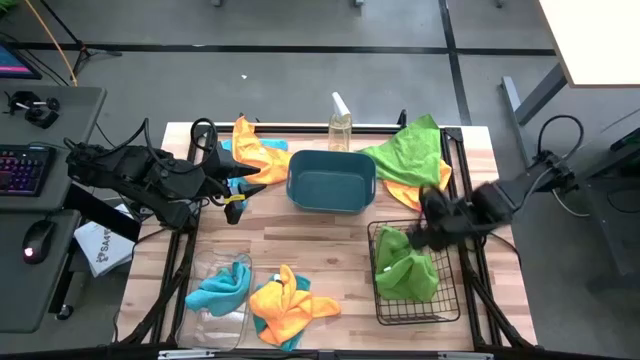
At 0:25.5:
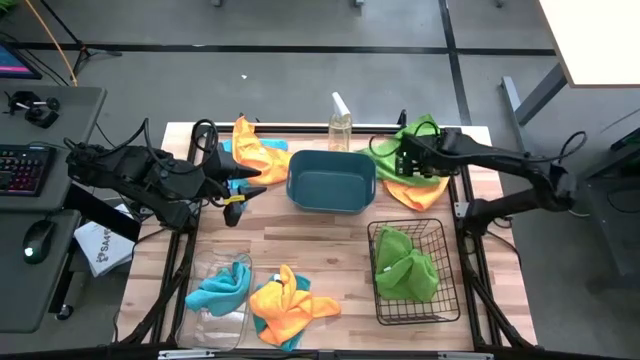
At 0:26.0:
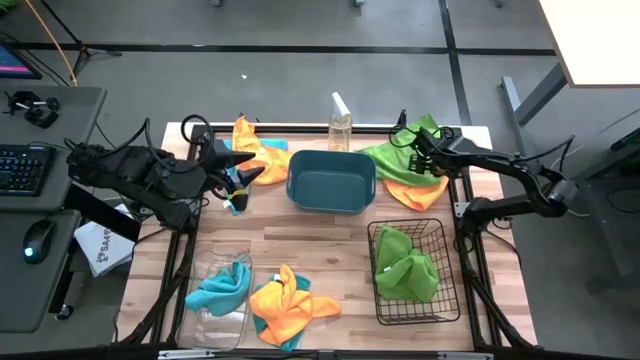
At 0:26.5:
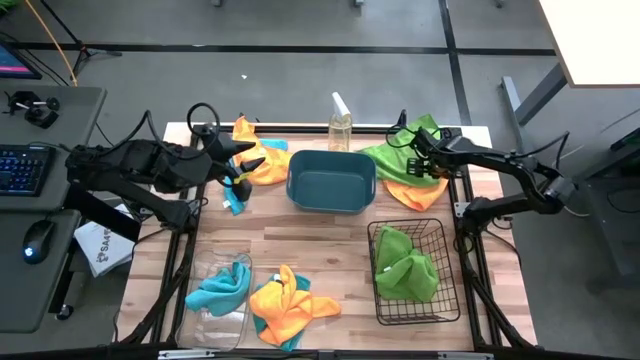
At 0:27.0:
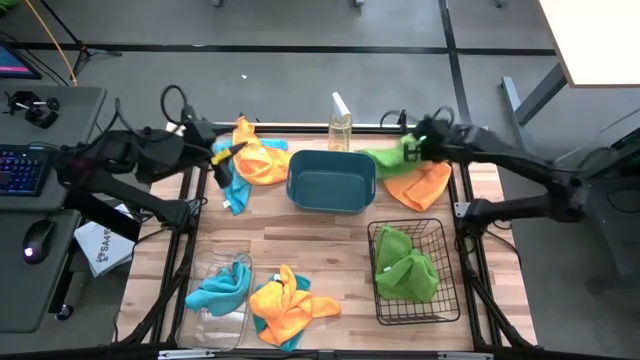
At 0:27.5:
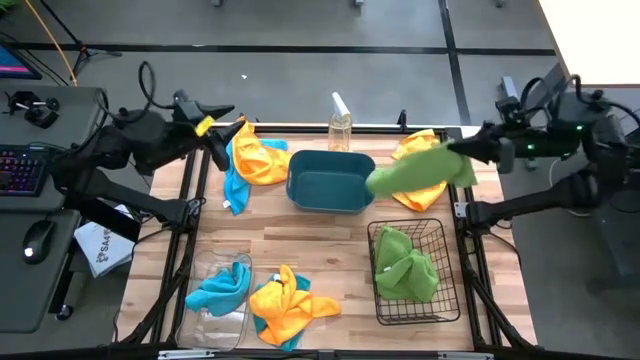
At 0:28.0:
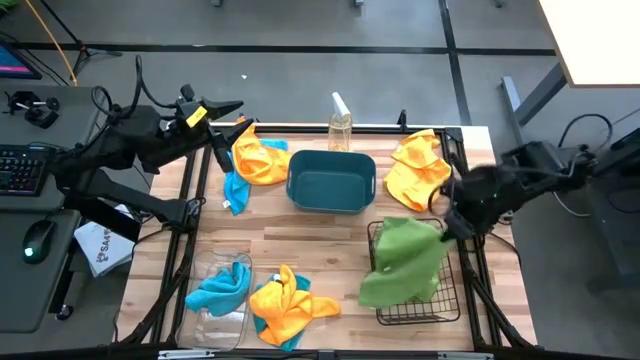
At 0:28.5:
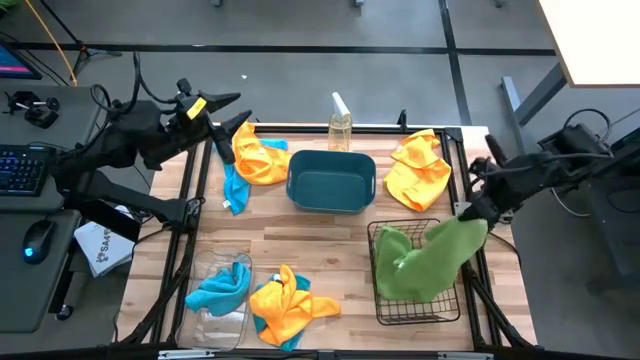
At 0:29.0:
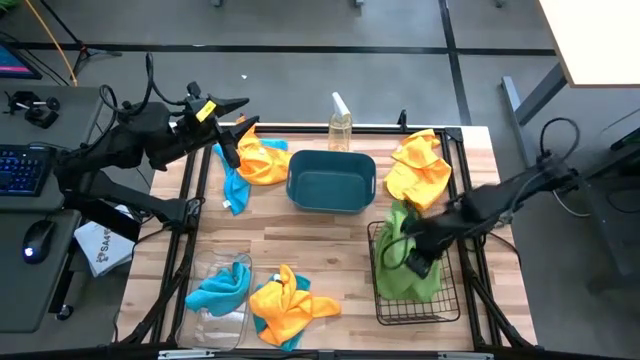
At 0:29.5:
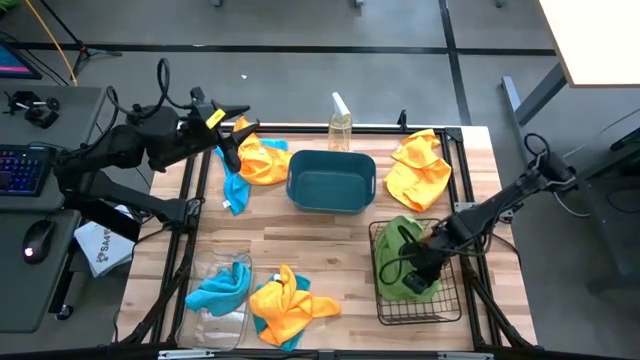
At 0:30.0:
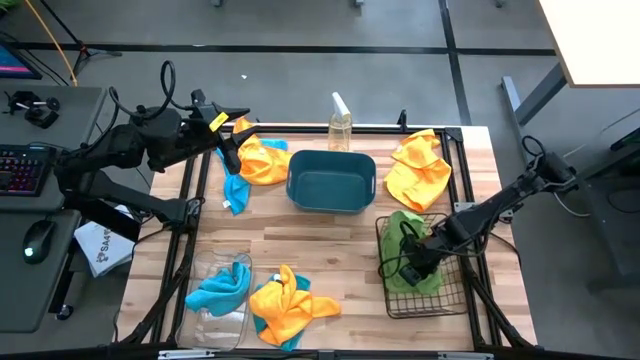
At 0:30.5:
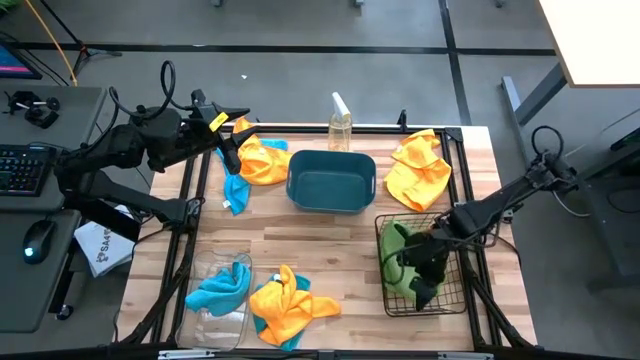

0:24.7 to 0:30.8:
Task: Sort microfiber towel by color & place in baskets
Put the green towel into the basket

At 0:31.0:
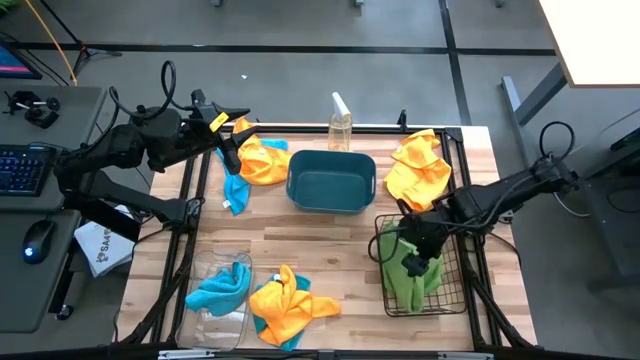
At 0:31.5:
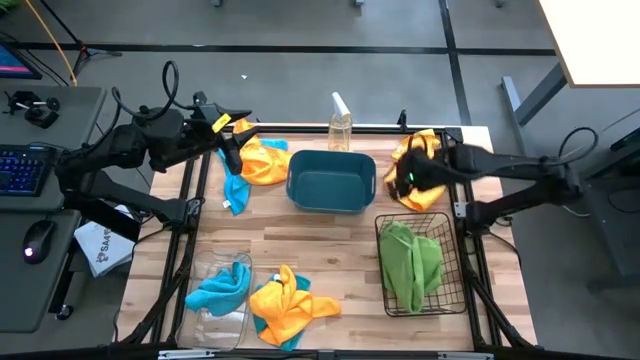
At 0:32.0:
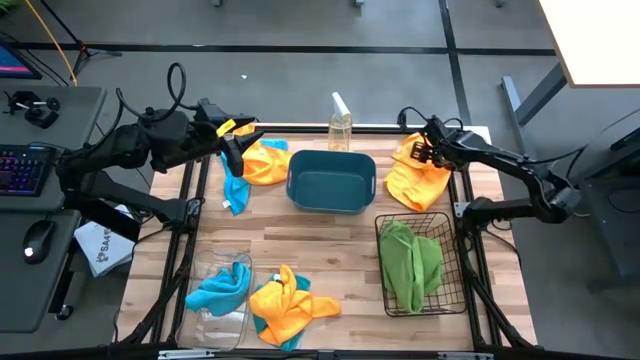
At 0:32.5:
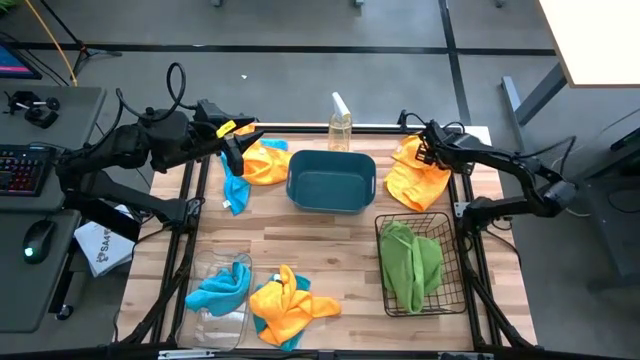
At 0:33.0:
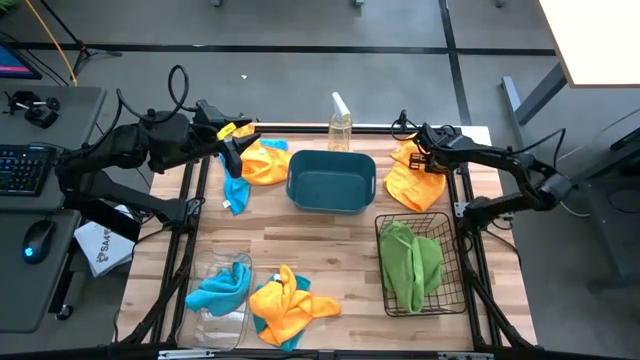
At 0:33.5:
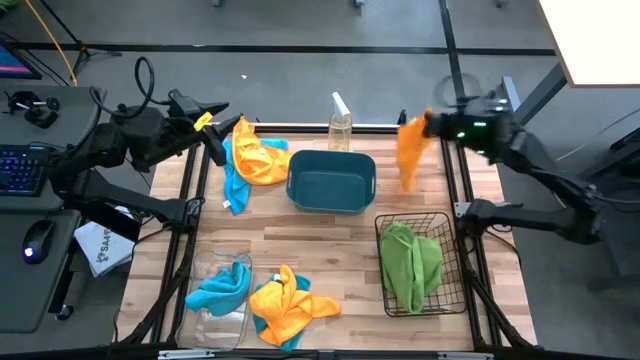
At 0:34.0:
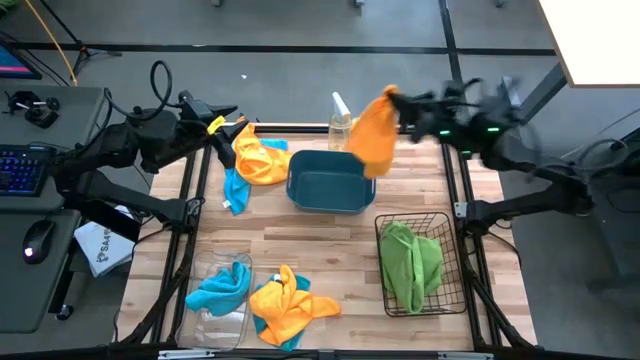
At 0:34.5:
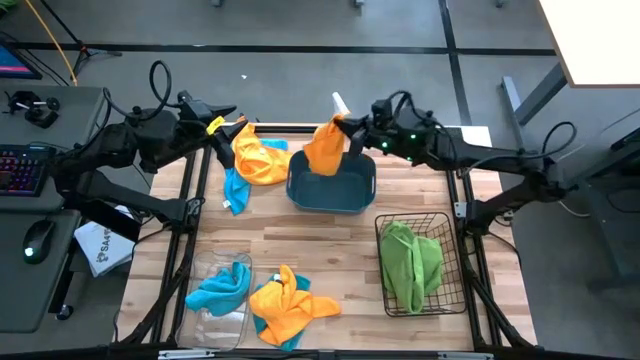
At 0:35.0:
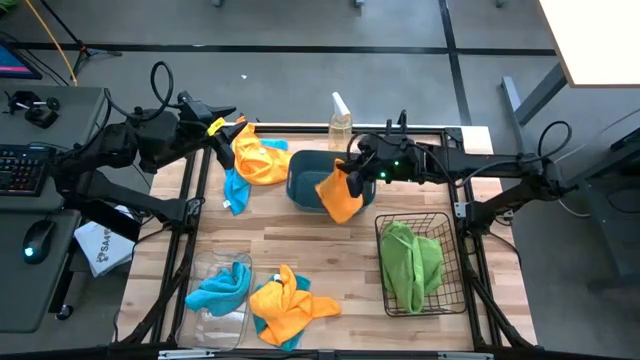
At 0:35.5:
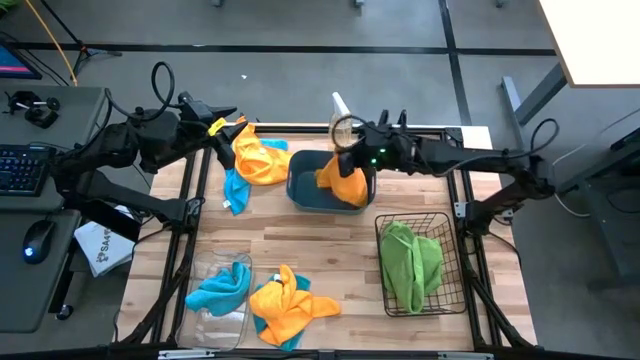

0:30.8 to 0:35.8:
Put the top right orange towel into the blue bin

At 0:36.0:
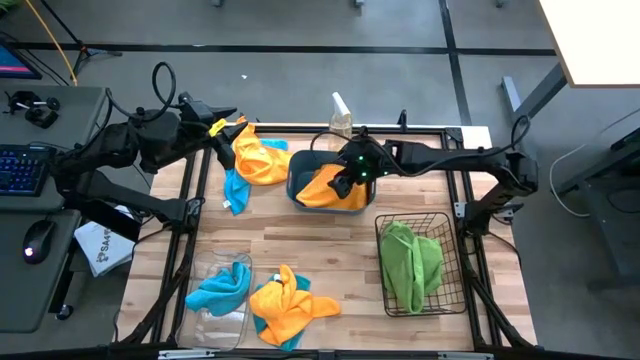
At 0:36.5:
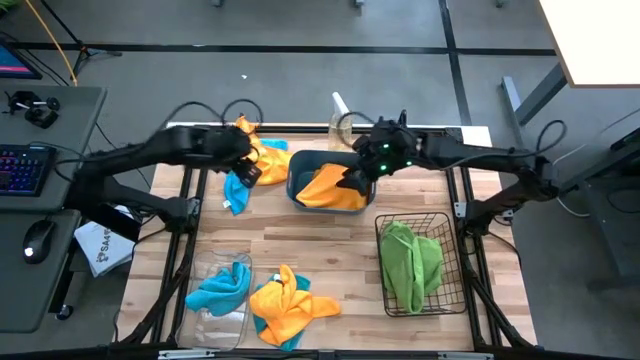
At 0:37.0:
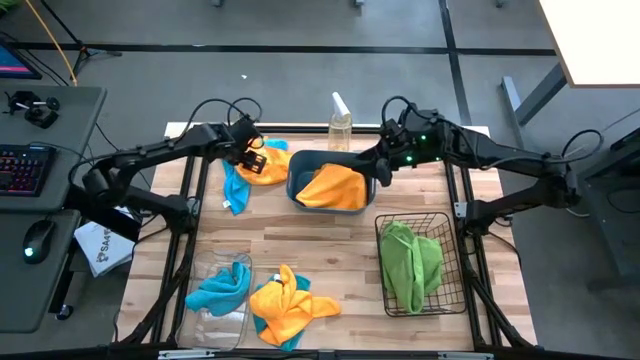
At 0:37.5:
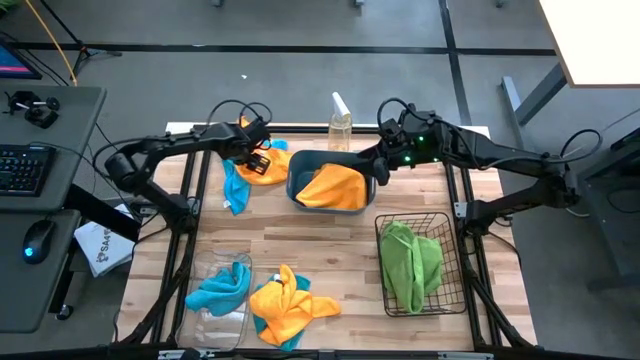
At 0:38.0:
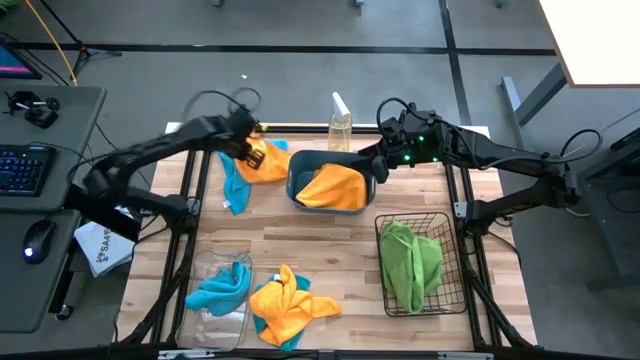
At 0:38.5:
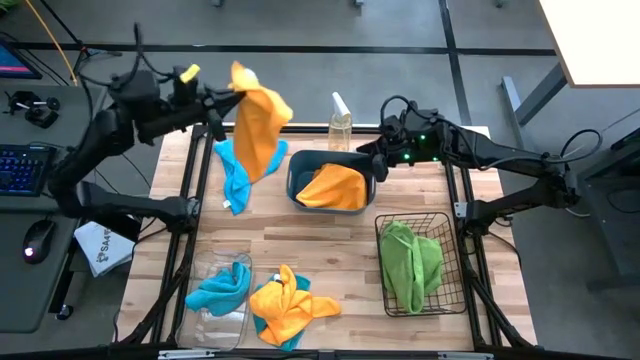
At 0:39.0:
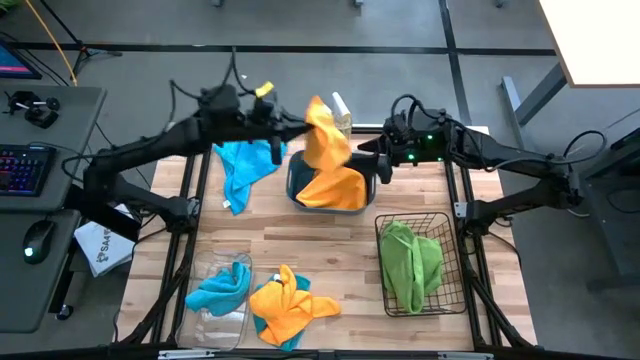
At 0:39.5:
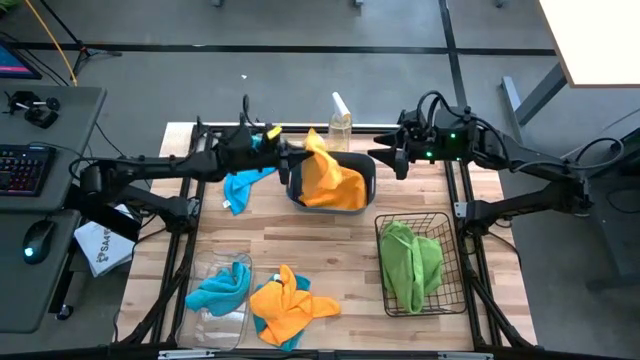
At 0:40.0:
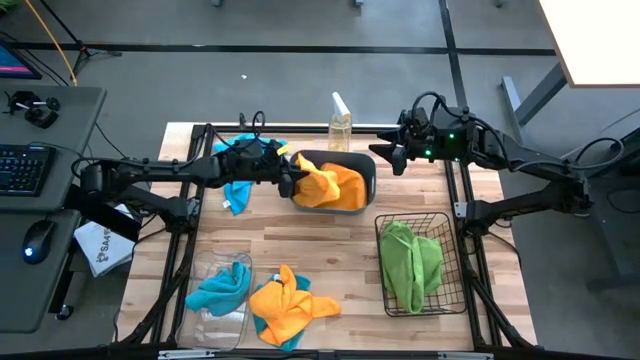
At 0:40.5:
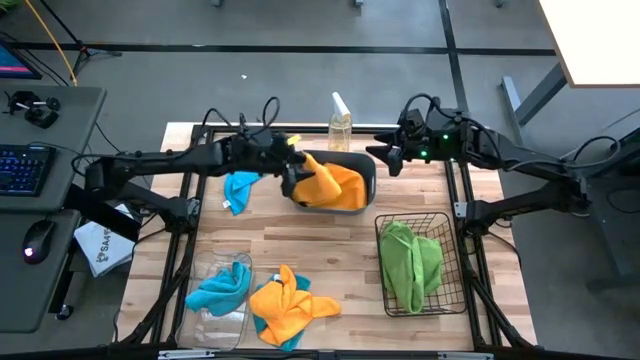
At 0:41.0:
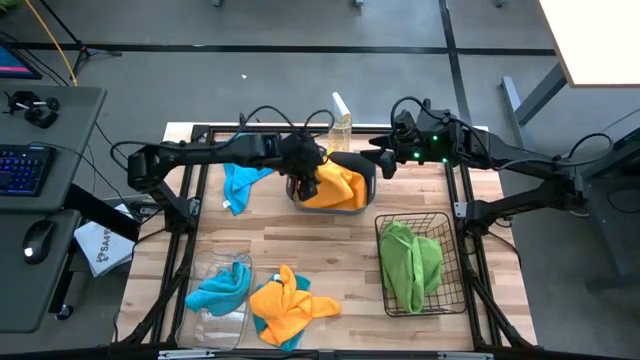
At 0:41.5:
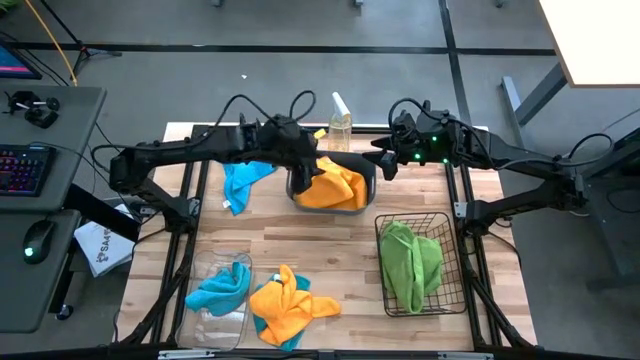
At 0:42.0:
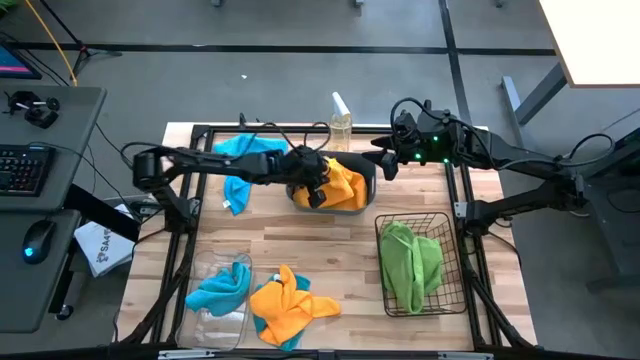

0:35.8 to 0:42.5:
Put the top yellow towel into the blue bin

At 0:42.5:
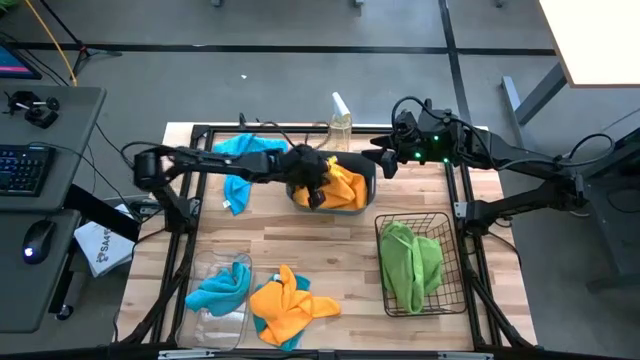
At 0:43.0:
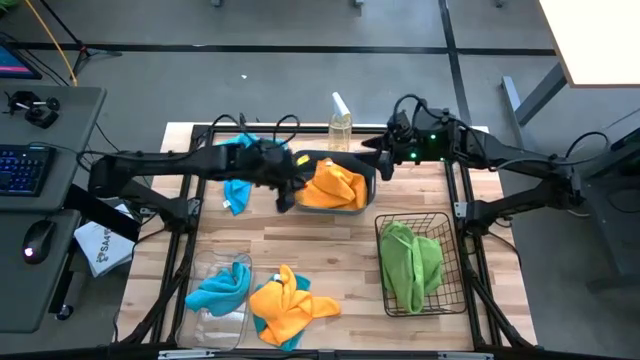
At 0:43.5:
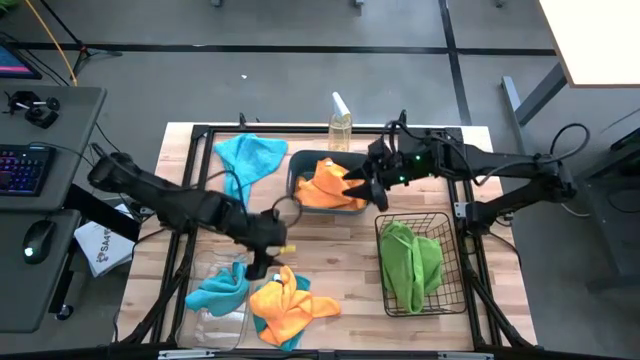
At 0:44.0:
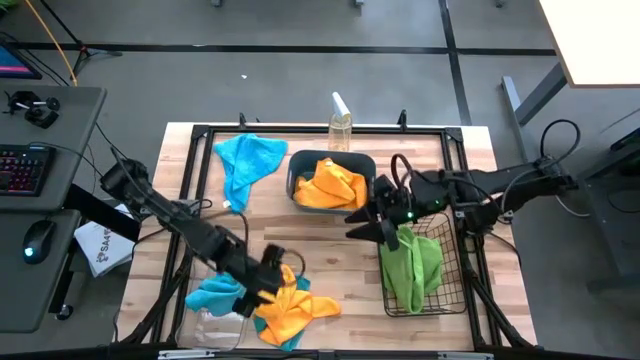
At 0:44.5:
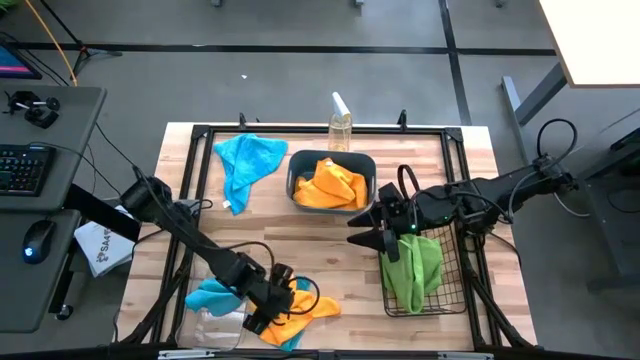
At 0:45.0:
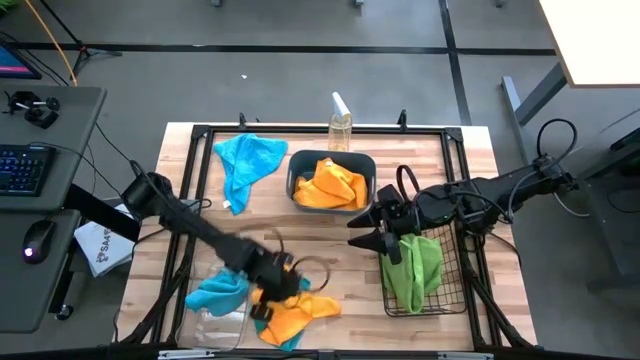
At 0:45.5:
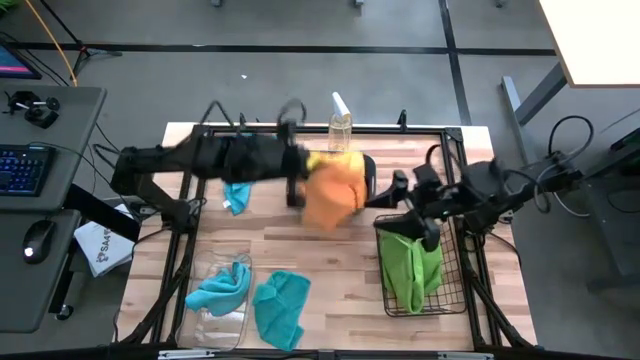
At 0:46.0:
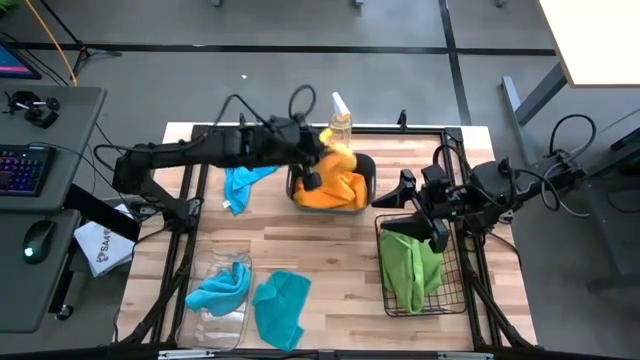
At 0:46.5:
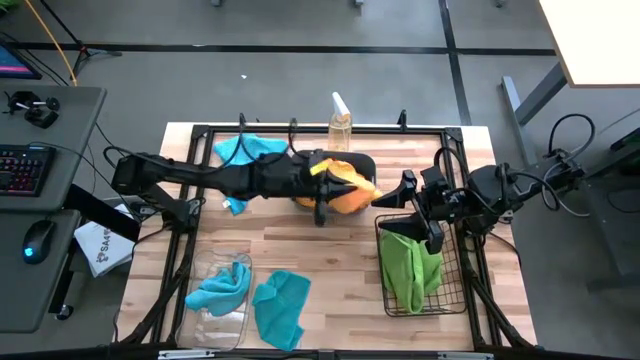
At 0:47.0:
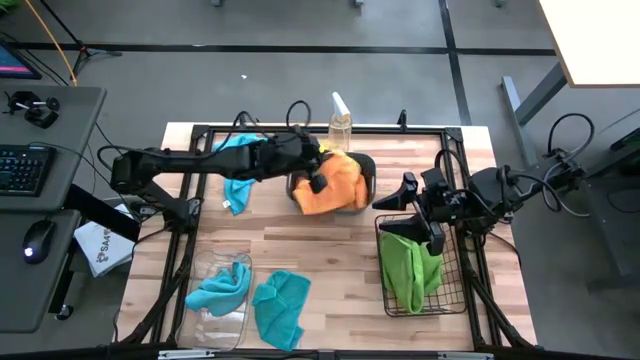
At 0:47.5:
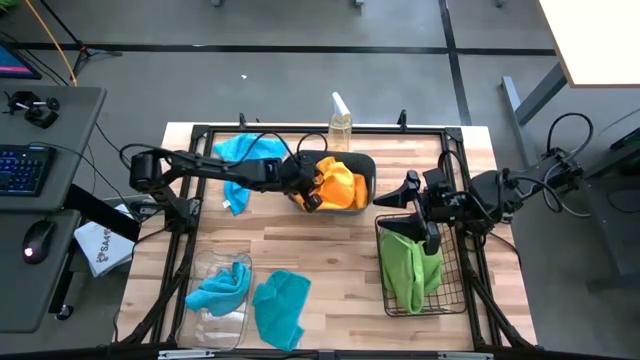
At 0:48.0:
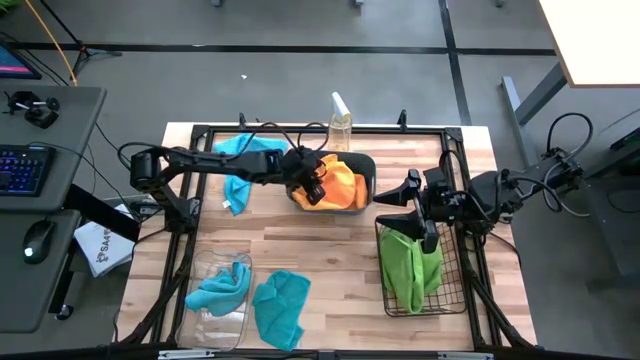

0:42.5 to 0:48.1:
Put the yellow towel into the blue bin
